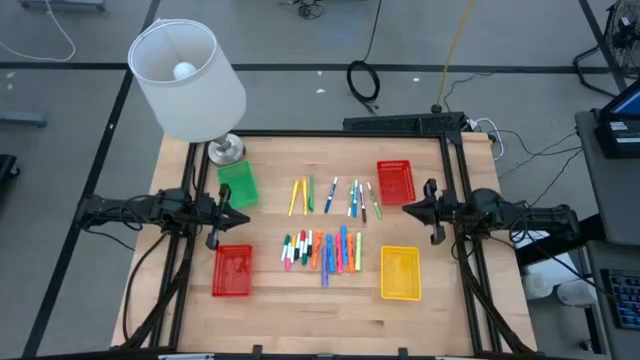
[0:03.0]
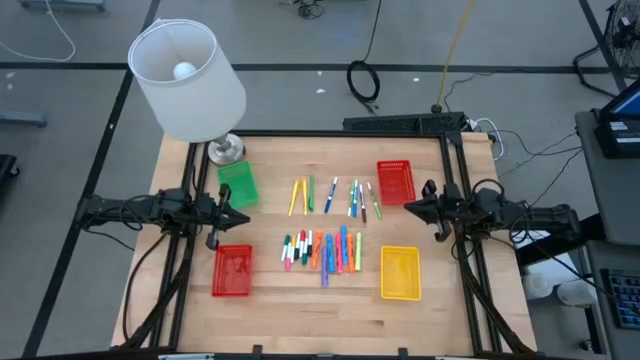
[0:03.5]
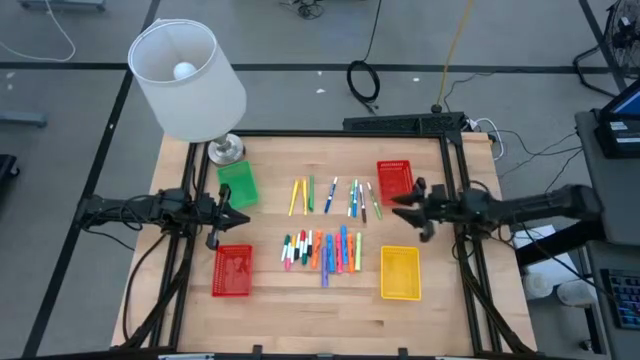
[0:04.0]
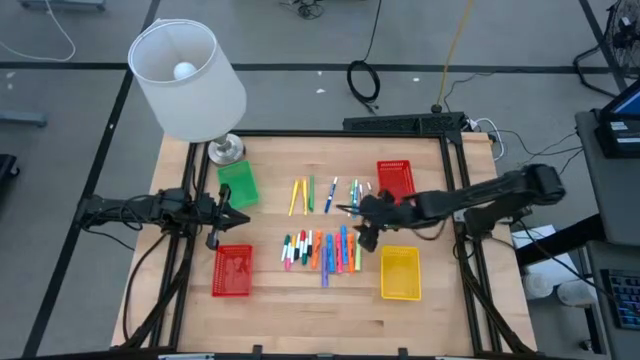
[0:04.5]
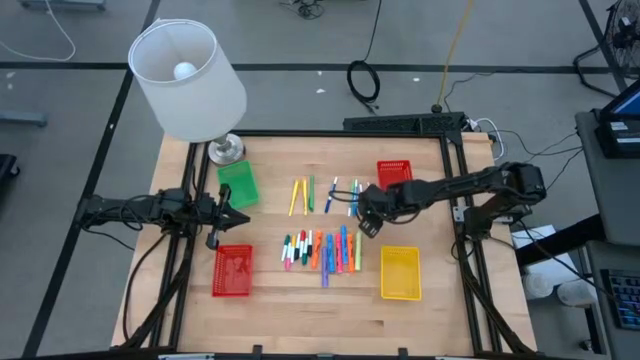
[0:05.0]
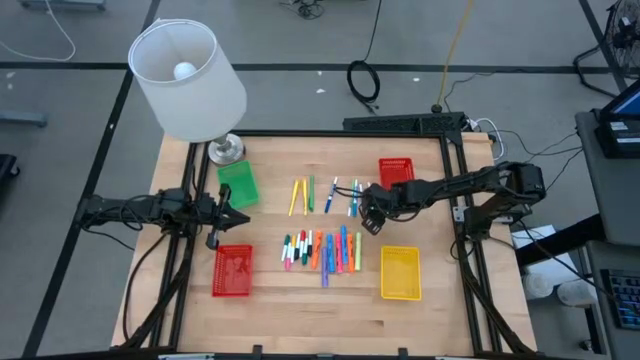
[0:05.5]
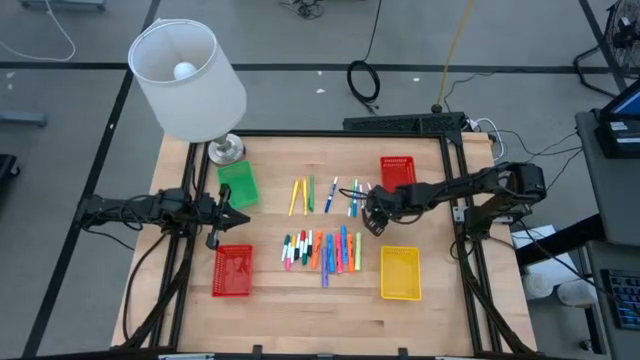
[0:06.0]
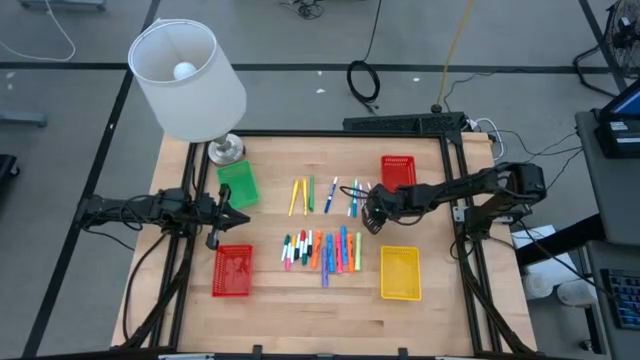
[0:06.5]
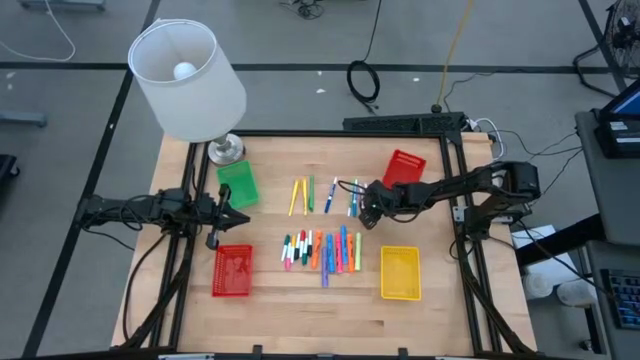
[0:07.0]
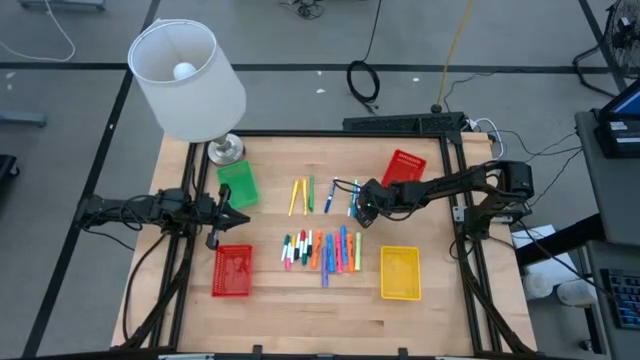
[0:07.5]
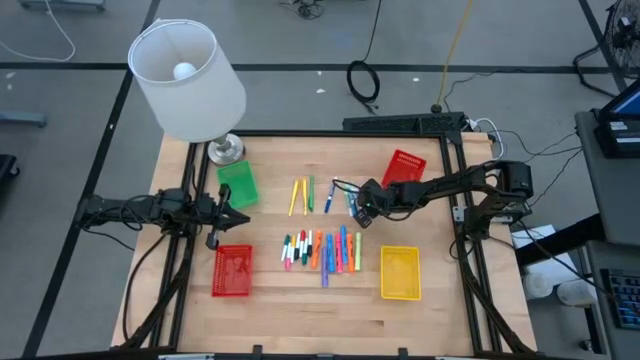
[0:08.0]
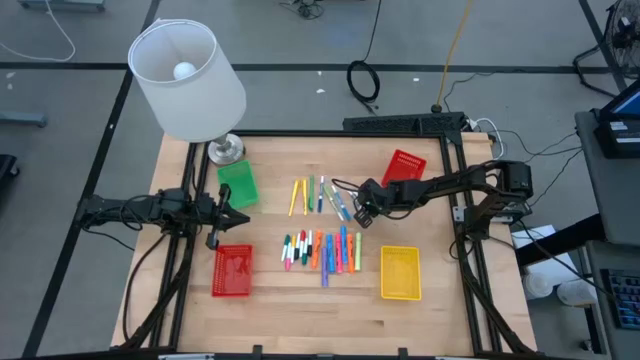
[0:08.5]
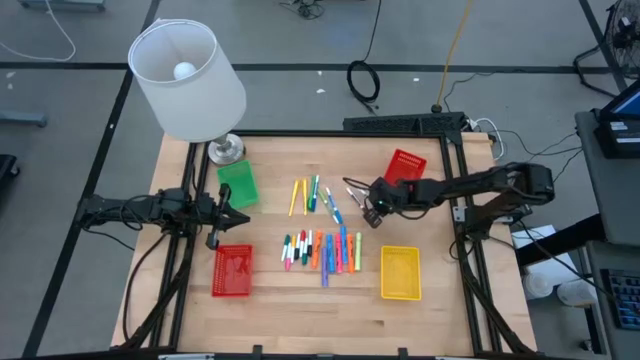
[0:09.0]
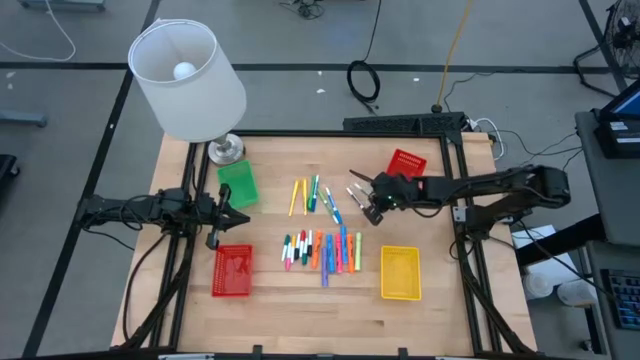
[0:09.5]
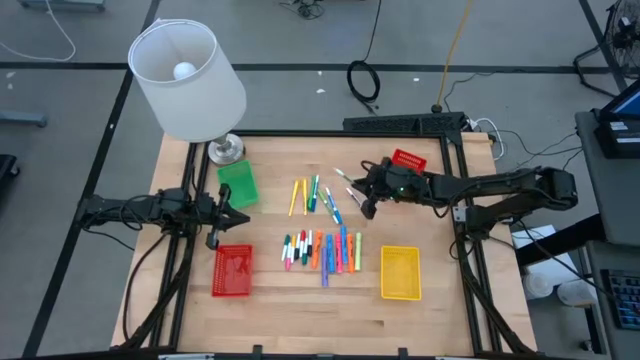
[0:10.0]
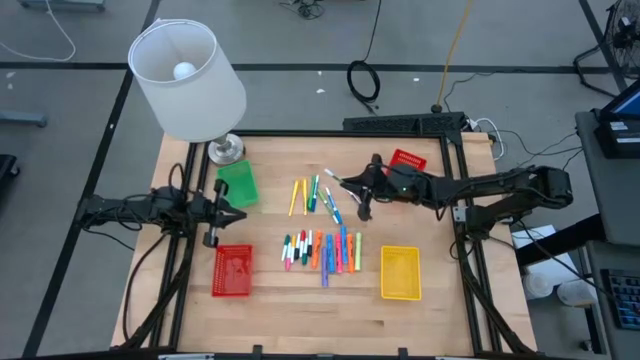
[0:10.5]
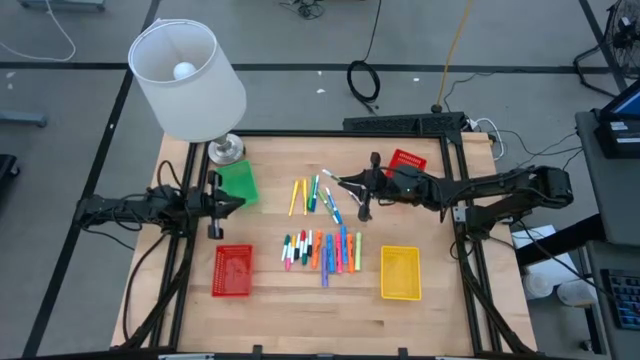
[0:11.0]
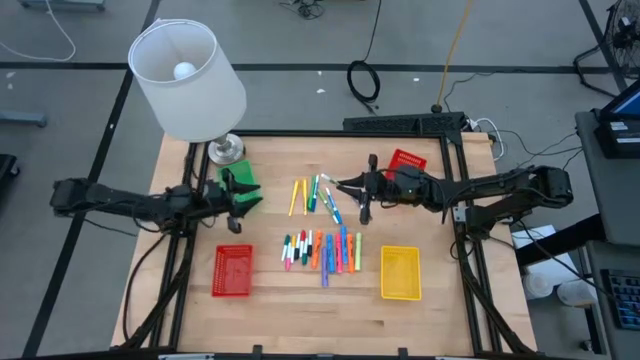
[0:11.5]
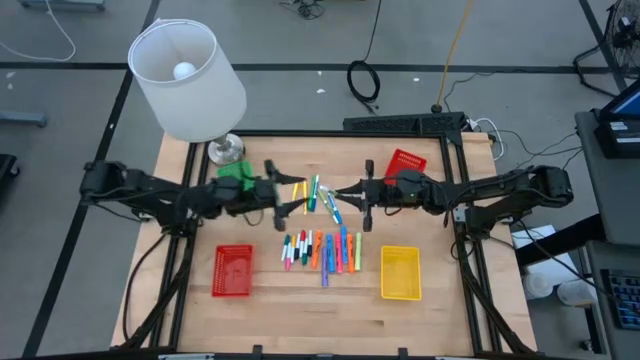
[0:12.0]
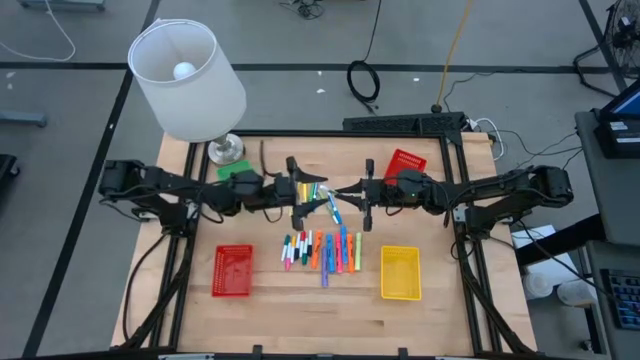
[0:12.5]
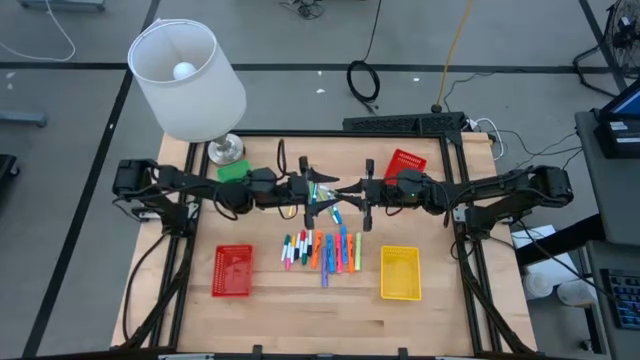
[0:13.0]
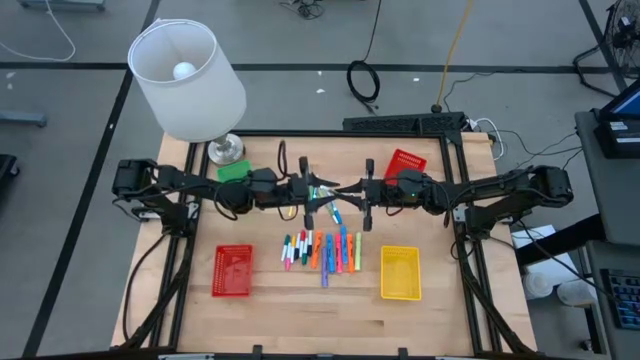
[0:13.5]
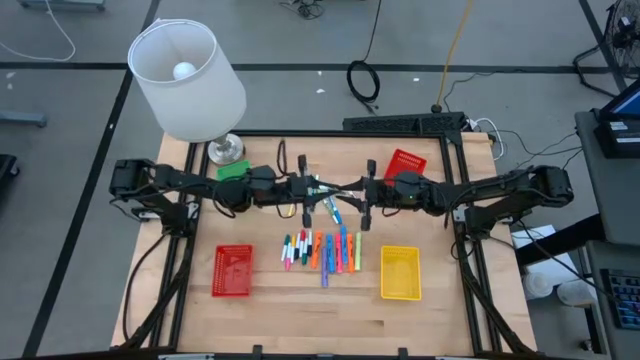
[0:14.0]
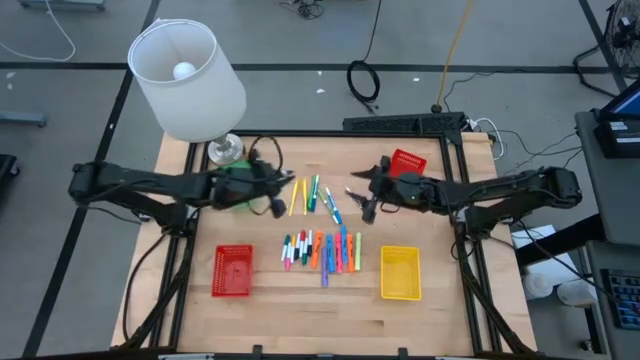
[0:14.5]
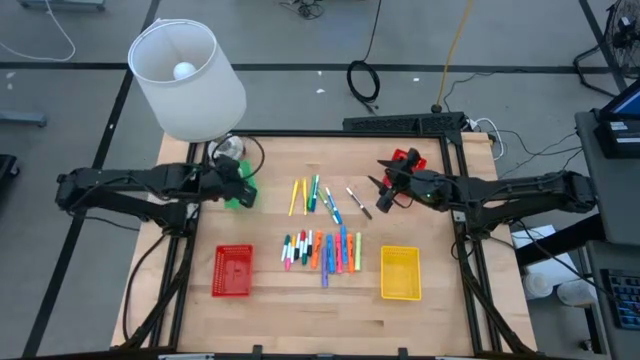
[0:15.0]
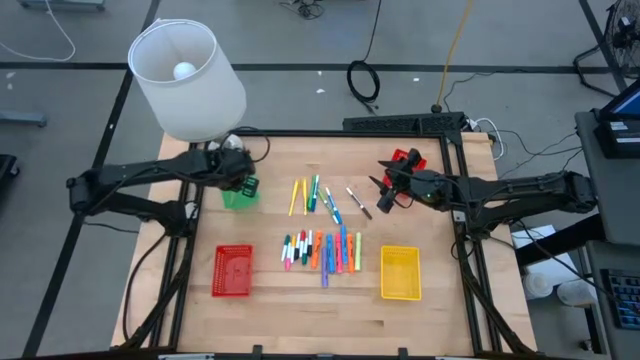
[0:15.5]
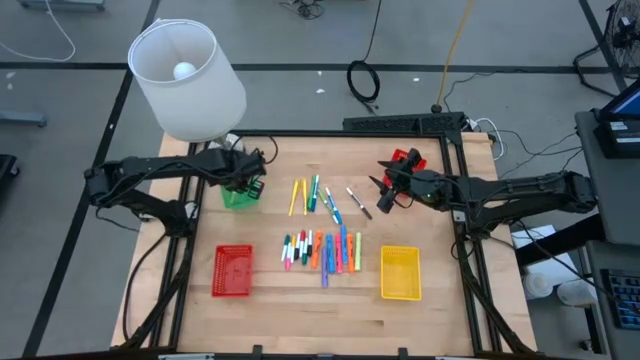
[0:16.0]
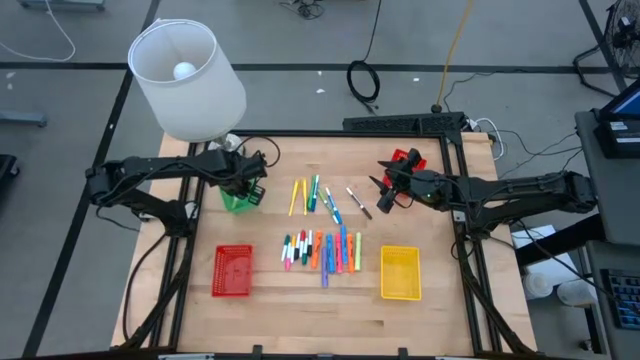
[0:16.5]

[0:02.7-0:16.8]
Task: Pick & Place Markers
Put the right green marker pen into the green basket

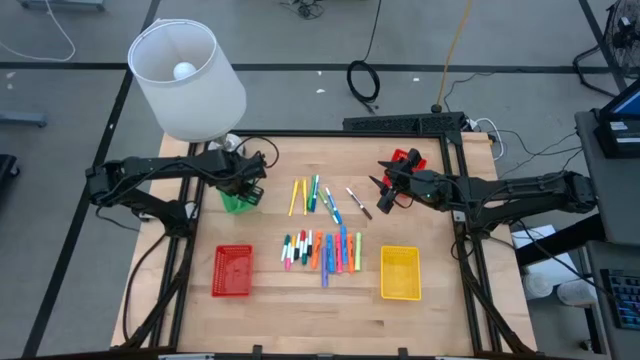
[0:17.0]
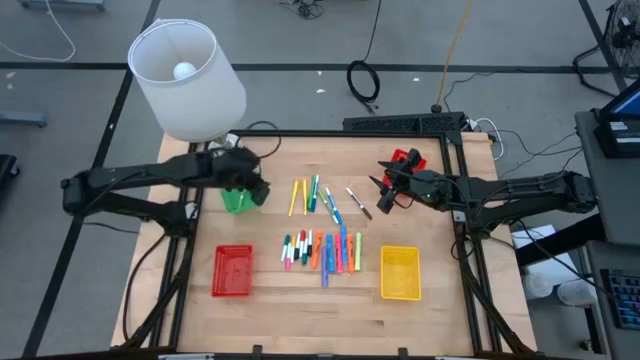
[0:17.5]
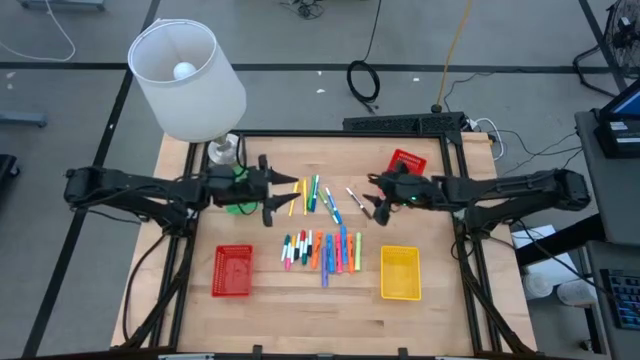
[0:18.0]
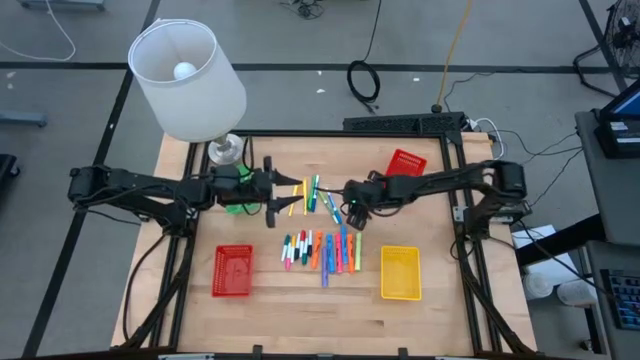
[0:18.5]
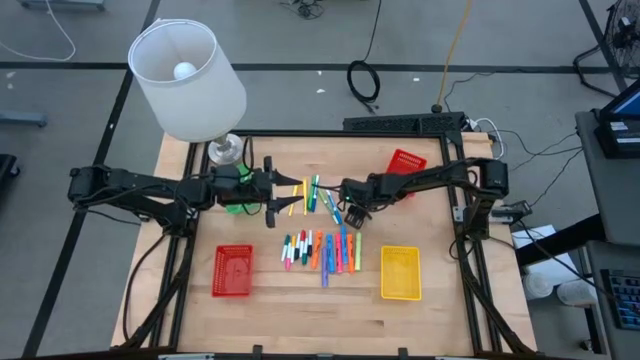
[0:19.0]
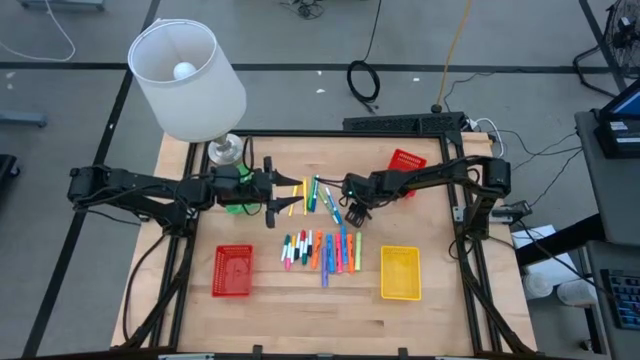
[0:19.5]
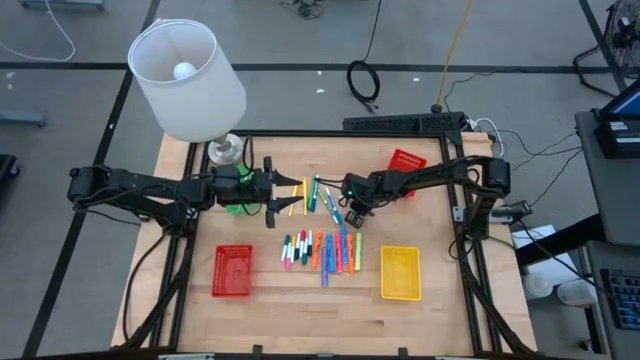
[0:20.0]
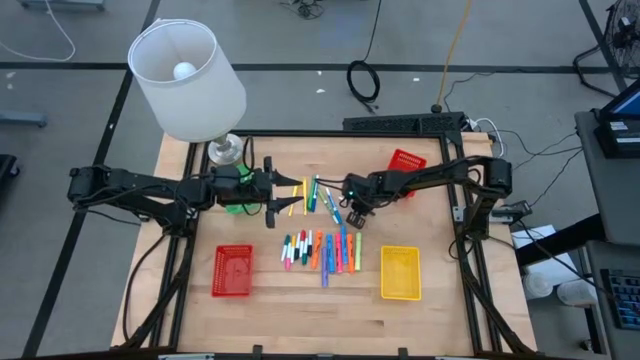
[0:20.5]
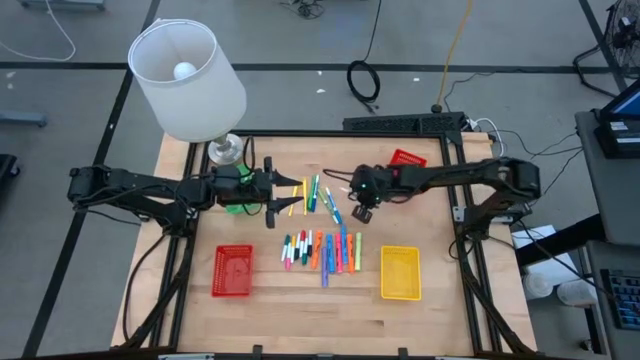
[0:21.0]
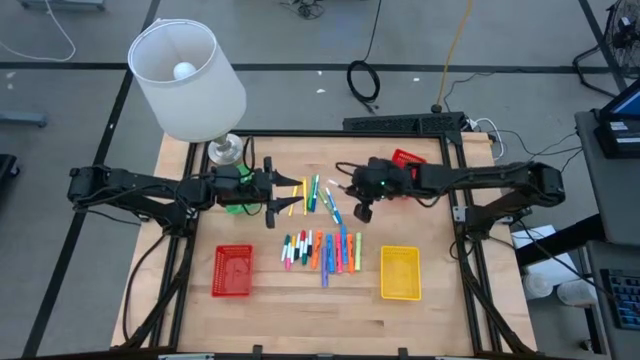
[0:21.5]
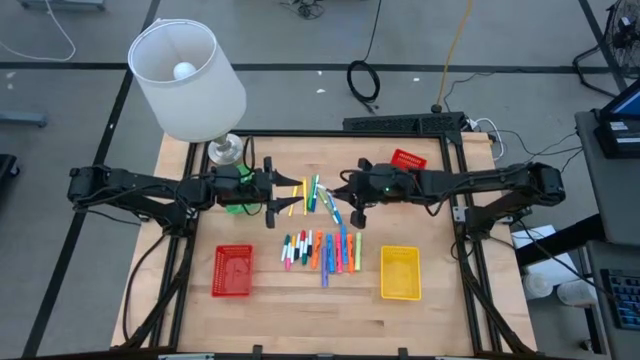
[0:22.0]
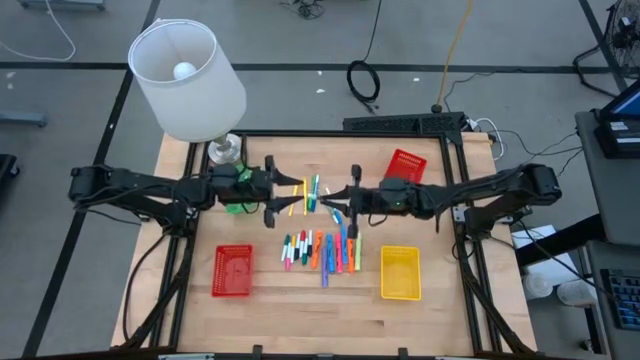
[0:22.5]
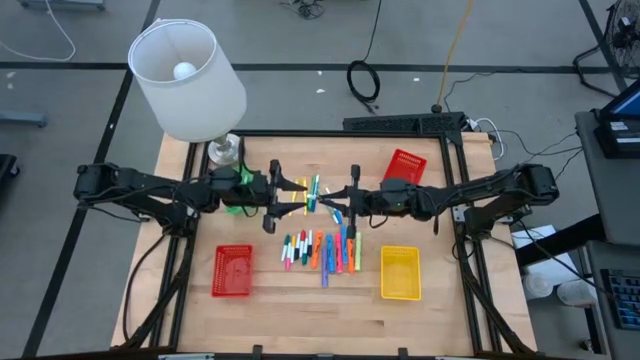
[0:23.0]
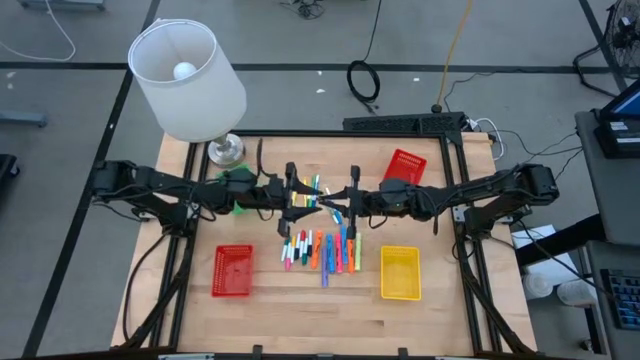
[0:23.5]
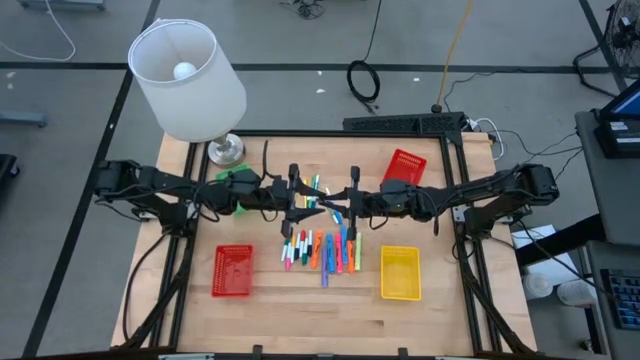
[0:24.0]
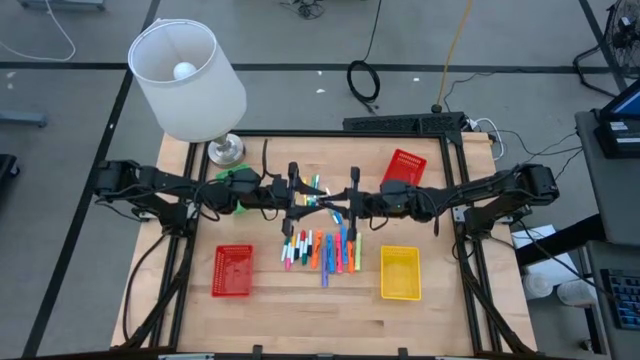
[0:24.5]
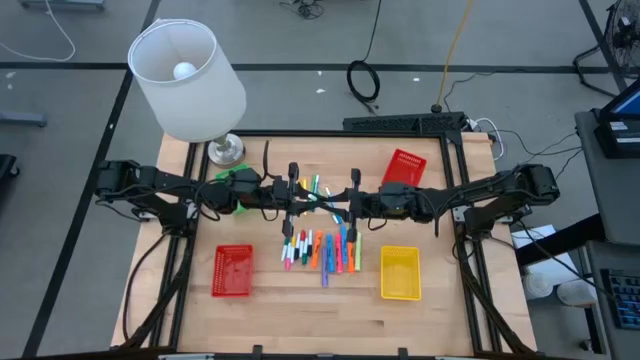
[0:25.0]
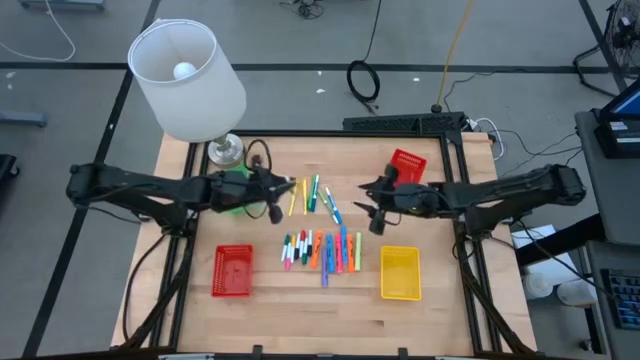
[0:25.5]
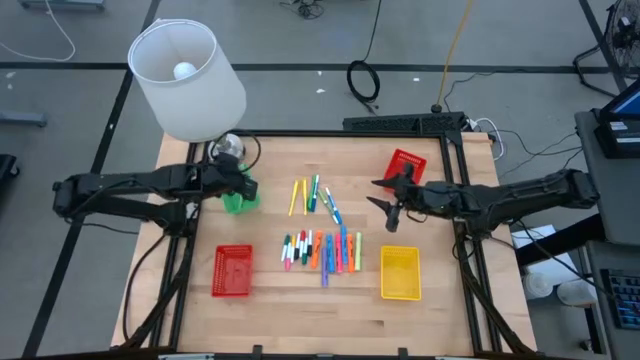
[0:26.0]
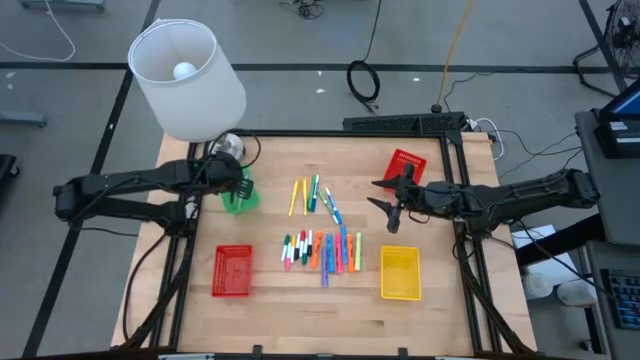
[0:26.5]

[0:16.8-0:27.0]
Put the brown marker pen into the green basket
